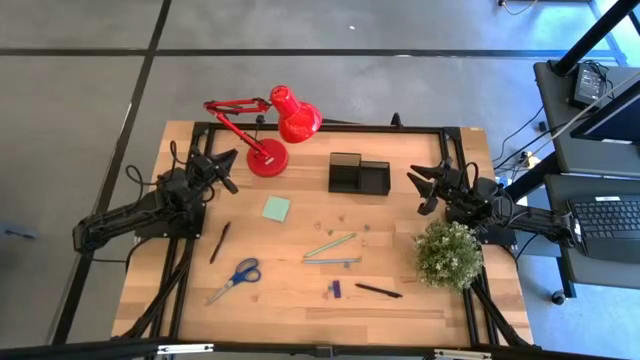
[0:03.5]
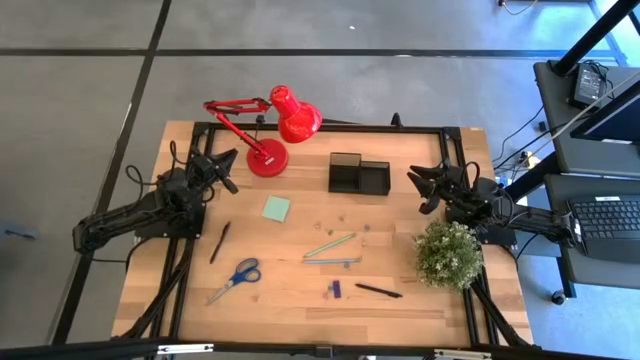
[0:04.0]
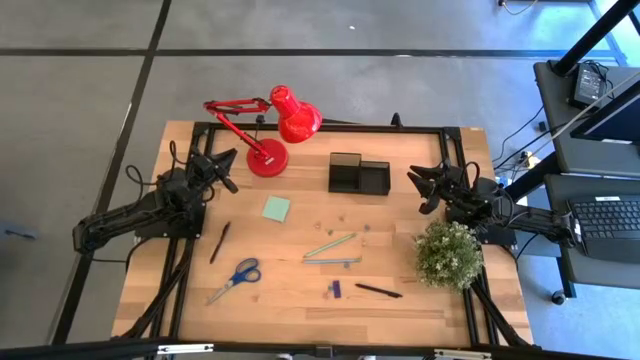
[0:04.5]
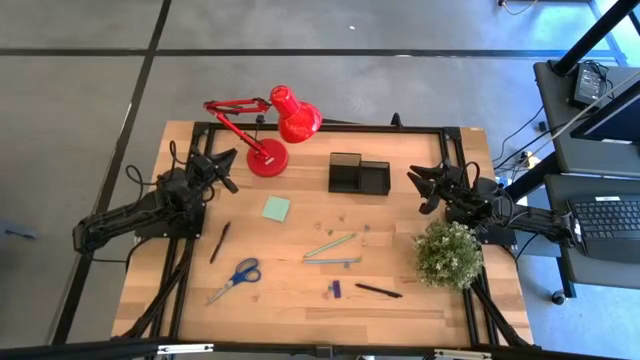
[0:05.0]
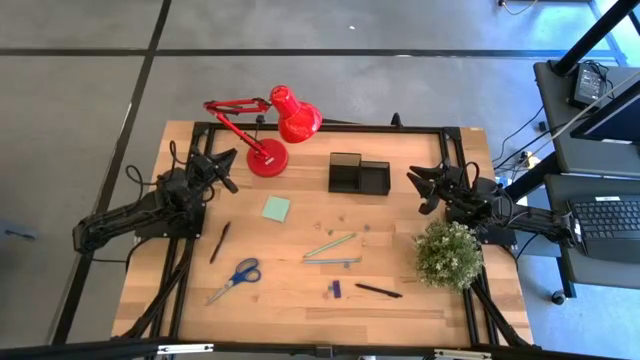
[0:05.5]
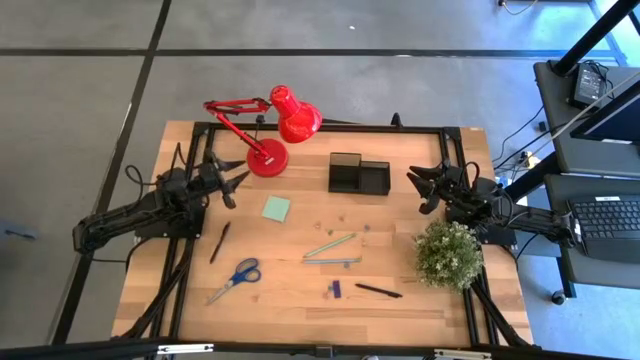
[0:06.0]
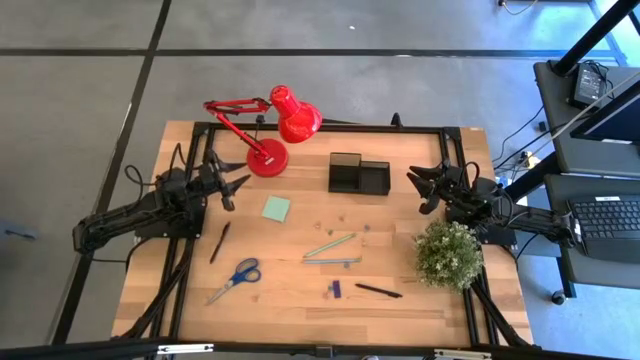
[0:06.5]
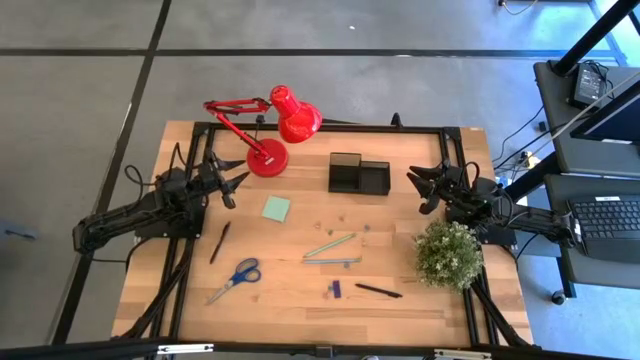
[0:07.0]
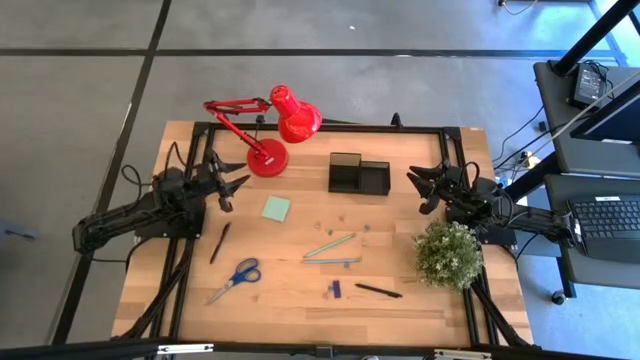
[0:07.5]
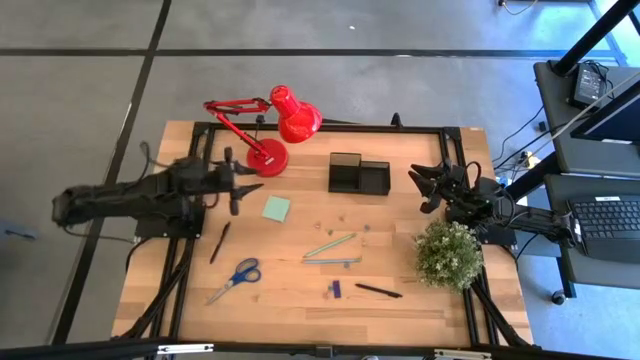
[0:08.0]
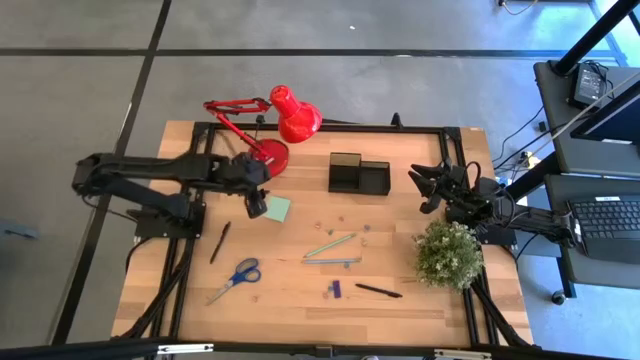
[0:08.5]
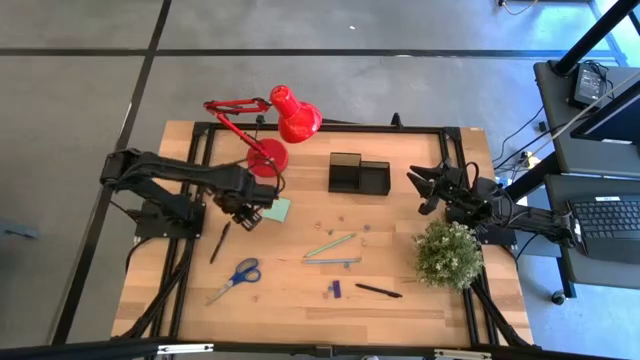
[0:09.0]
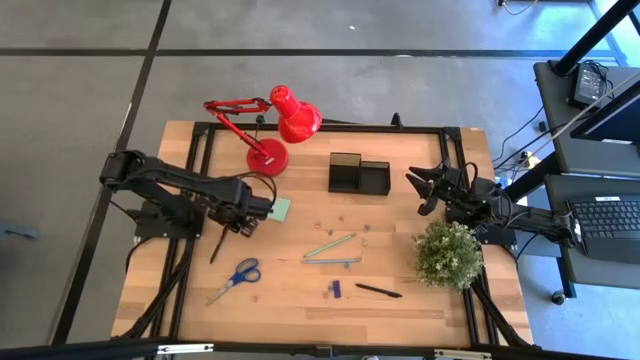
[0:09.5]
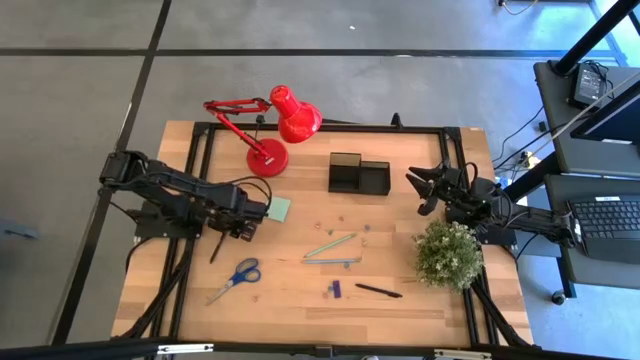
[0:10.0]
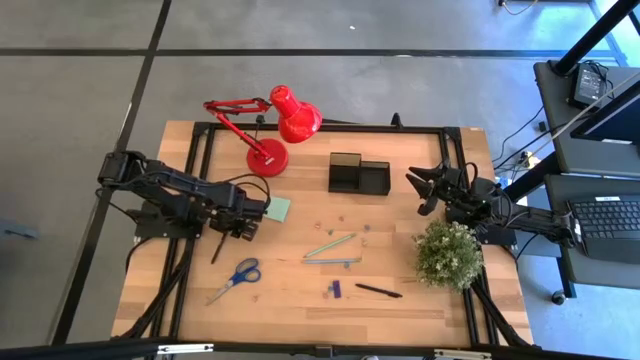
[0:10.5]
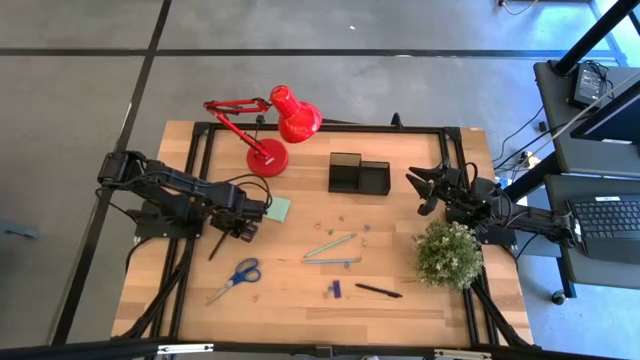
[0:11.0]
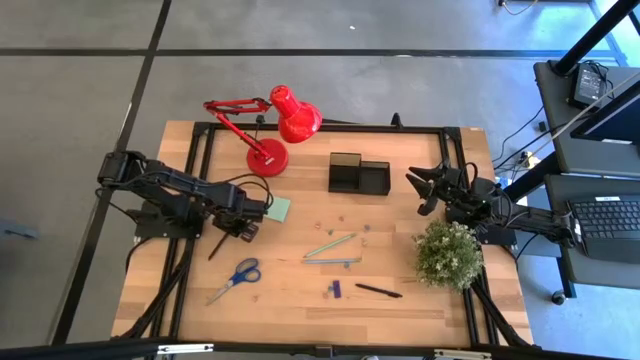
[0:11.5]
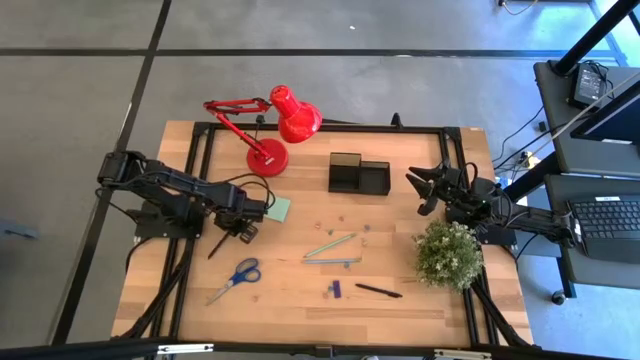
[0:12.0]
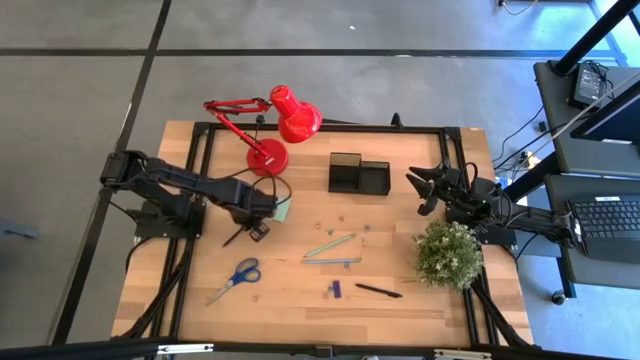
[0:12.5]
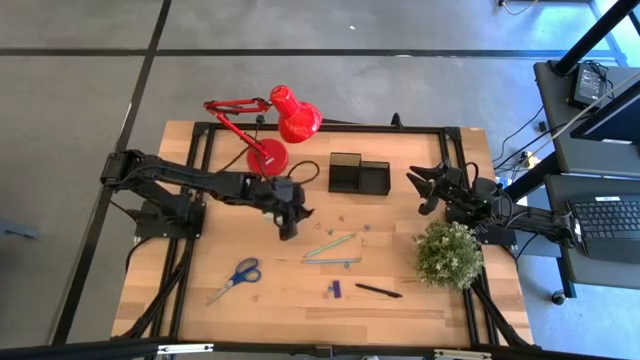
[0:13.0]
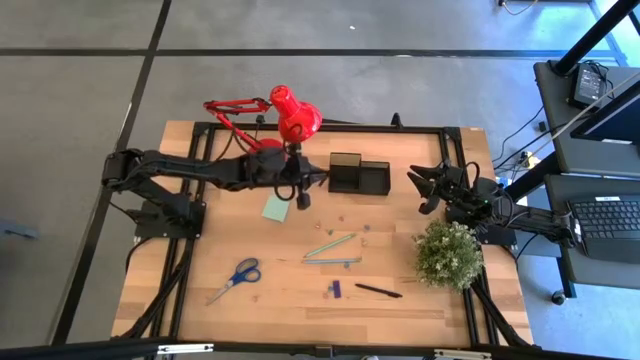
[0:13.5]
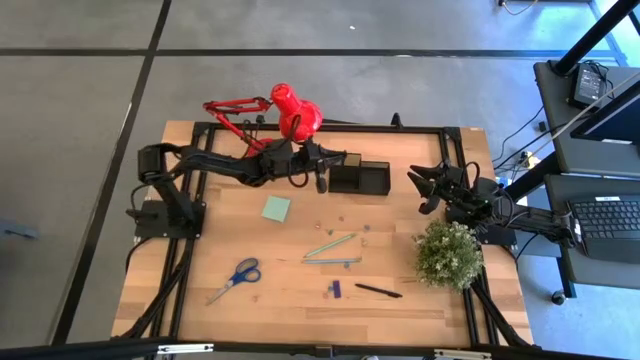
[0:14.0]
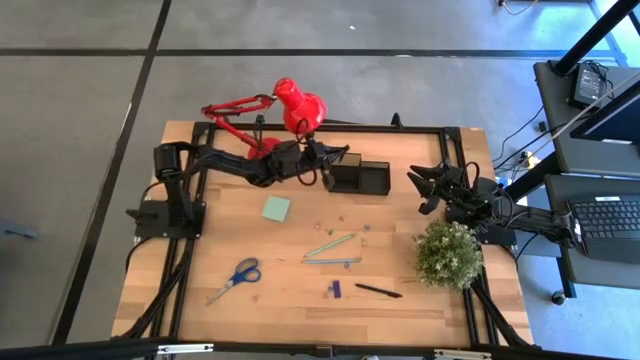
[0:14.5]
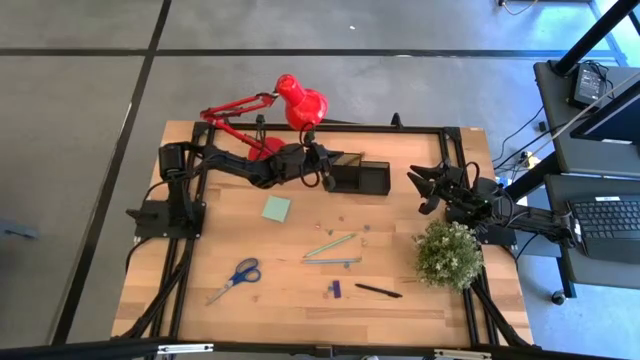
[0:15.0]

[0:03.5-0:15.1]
Task: Pick and place office supplies into organizer
Put the left black pen into the black desk organizer

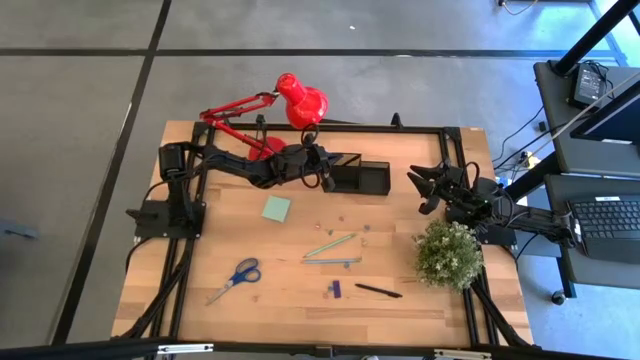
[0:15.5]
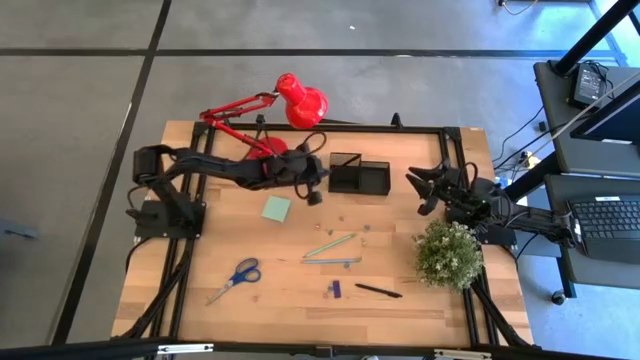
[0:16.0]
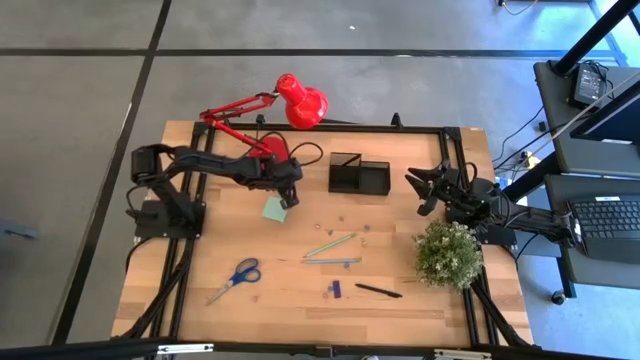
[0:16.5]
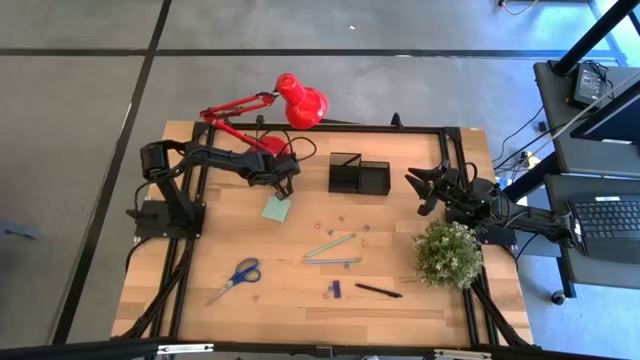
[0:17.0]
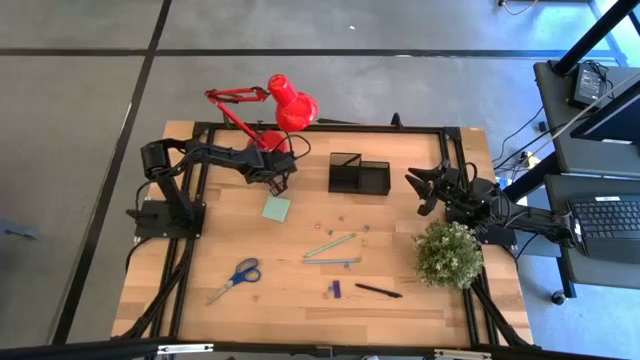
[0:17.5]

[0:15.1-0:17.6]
Adjust the red lamp on the table

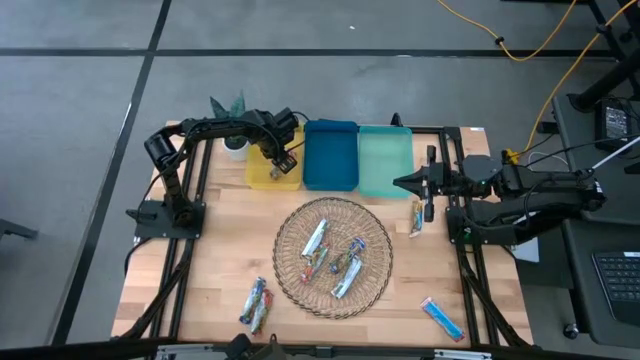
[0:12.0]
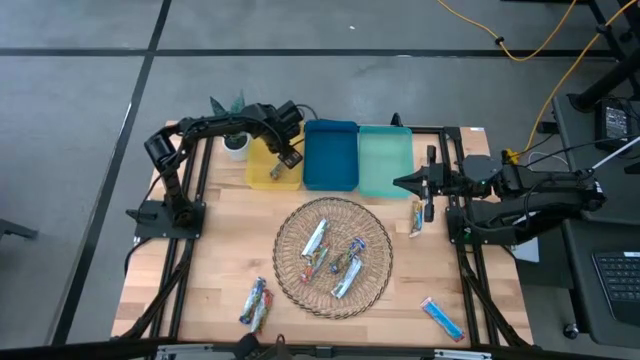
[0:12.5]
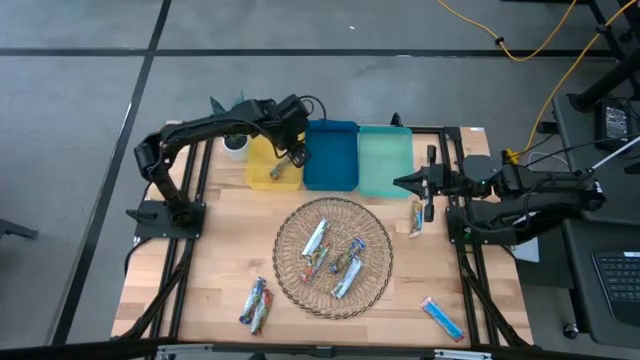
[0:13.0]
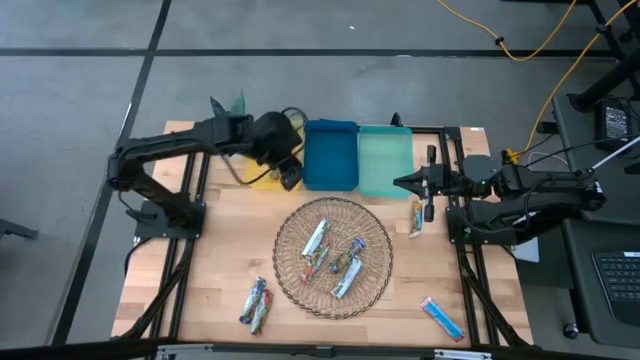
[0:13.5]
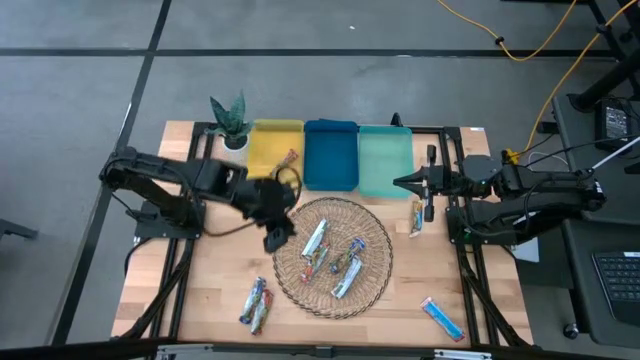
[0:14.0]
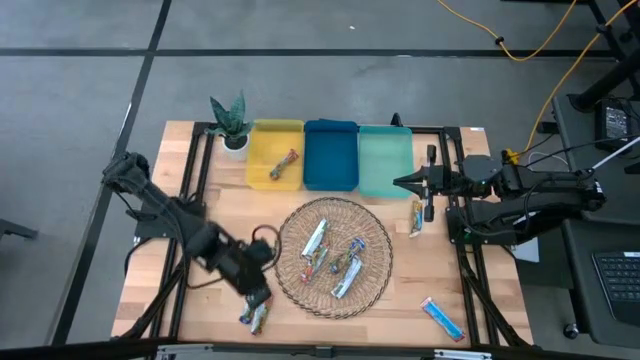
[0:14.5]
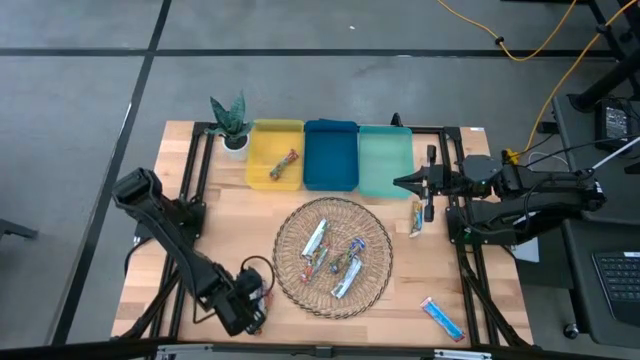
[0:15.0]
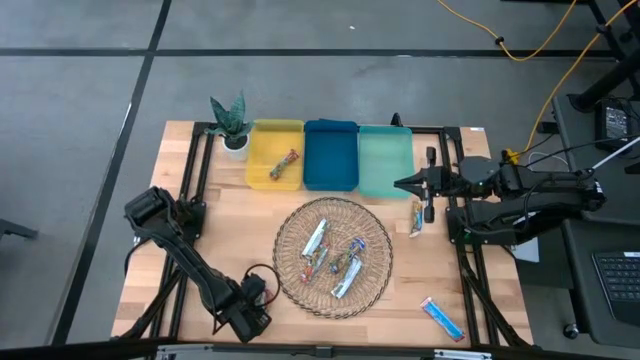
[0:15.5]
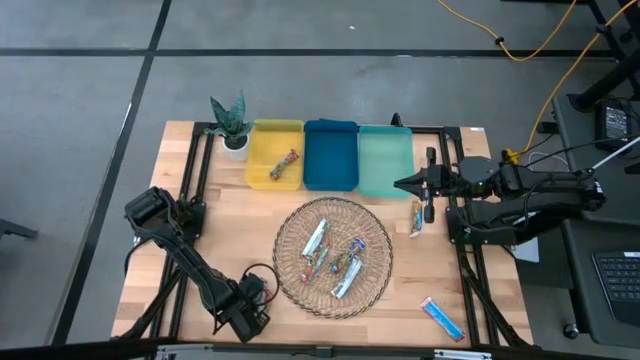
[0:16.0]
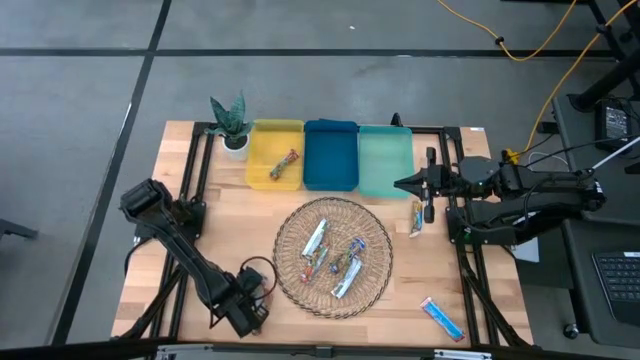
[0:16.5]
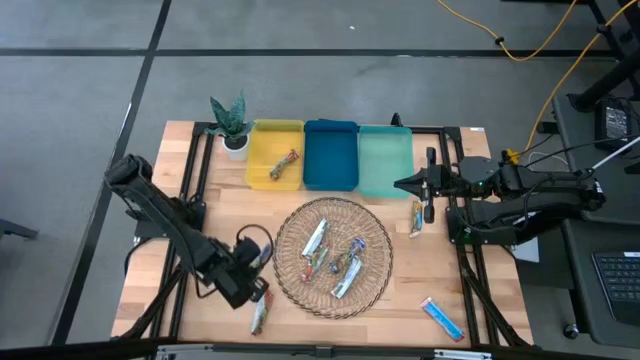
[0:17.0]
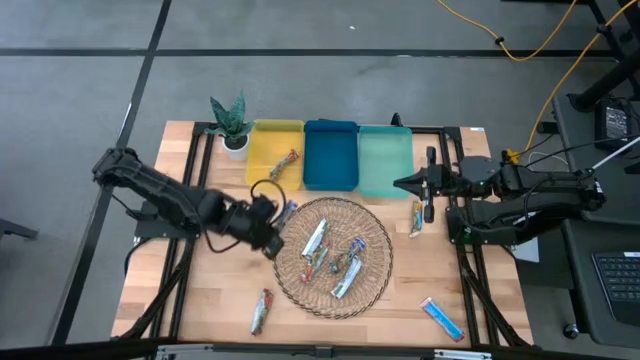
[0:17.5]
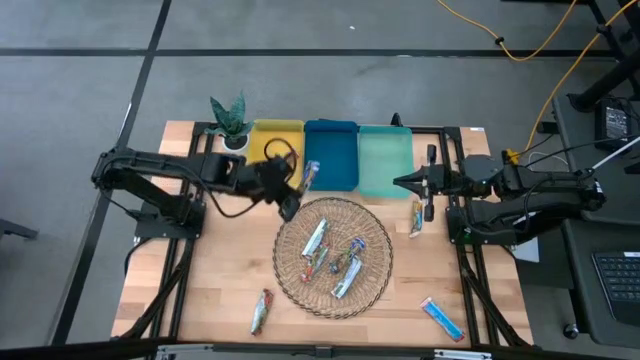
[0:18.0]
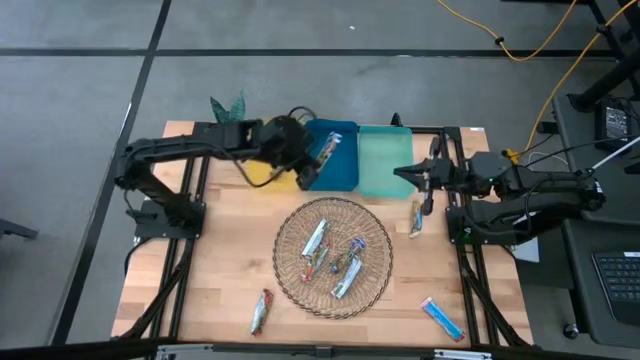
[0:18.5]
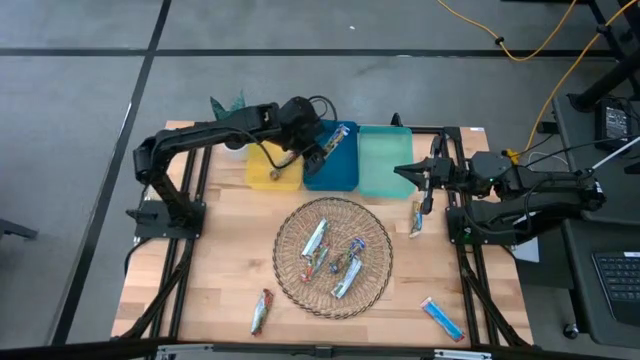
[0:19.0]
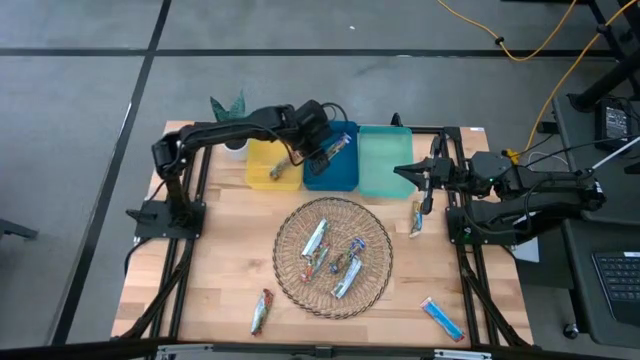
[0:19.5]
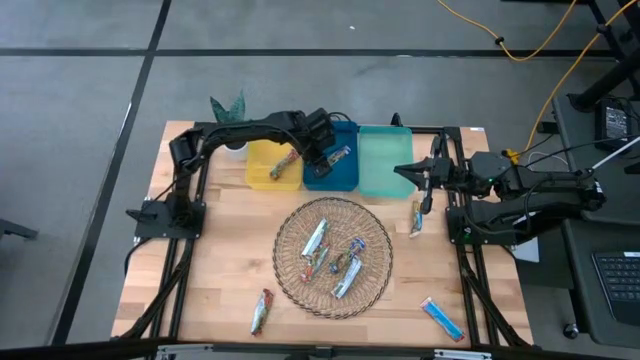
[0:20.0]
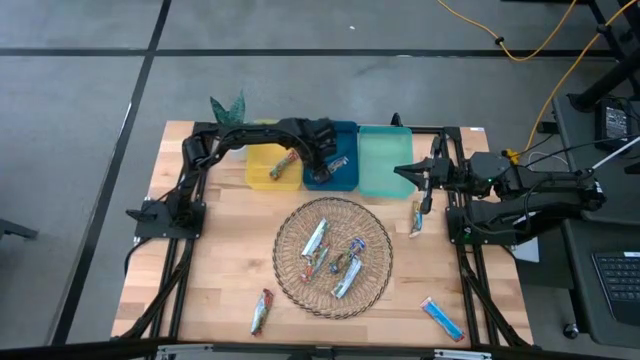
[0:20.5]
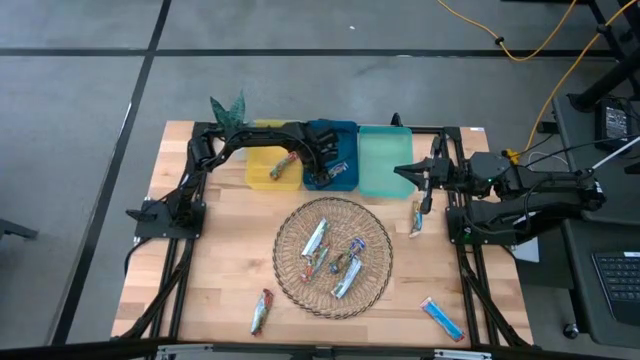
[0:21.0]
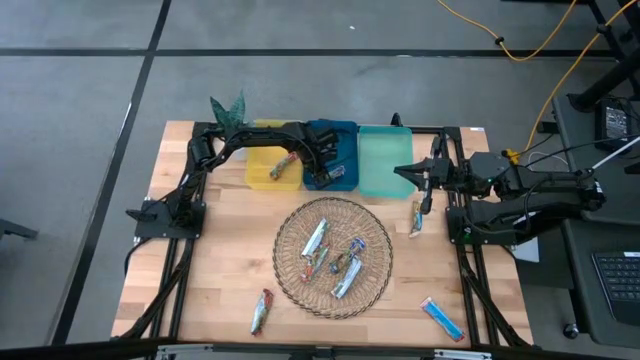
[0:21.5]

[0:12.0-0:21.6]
Task: Pick and place Granola Bars by type
Put the blue granola bar into the blue bin
